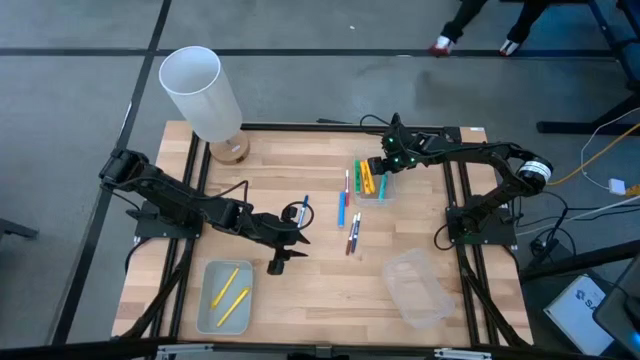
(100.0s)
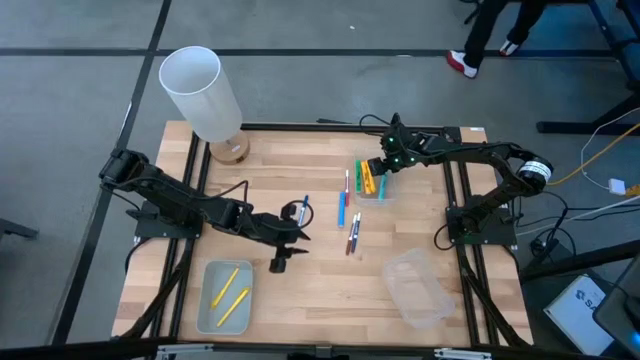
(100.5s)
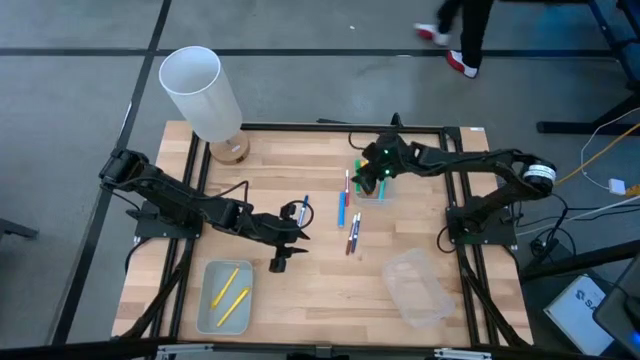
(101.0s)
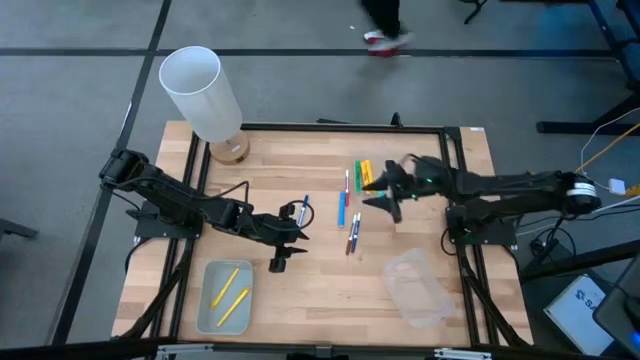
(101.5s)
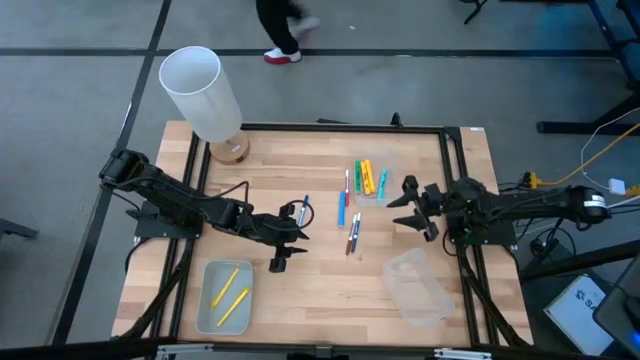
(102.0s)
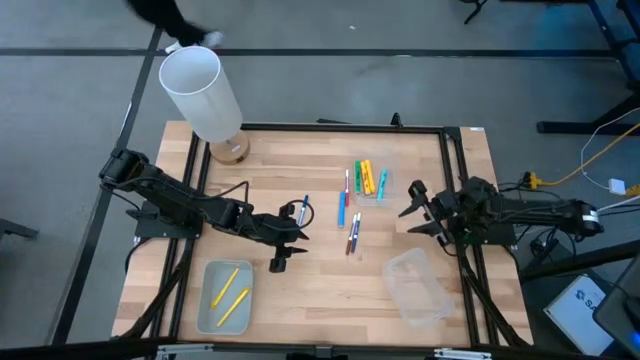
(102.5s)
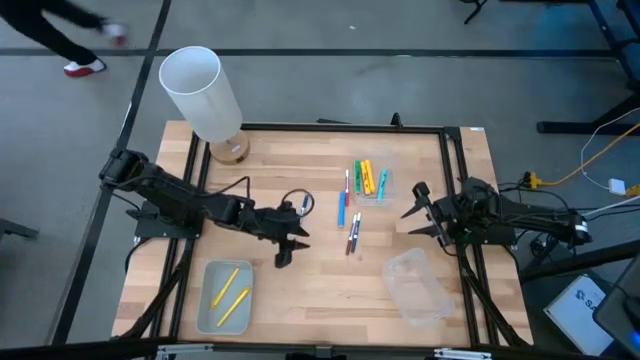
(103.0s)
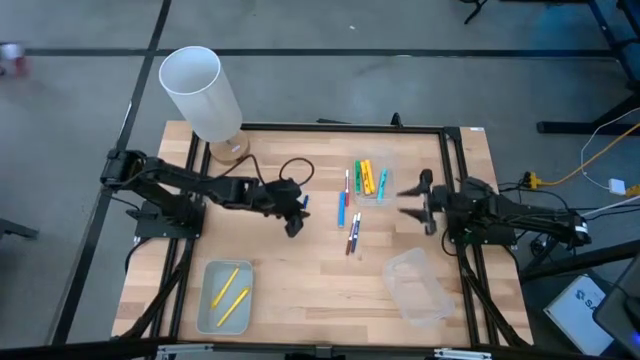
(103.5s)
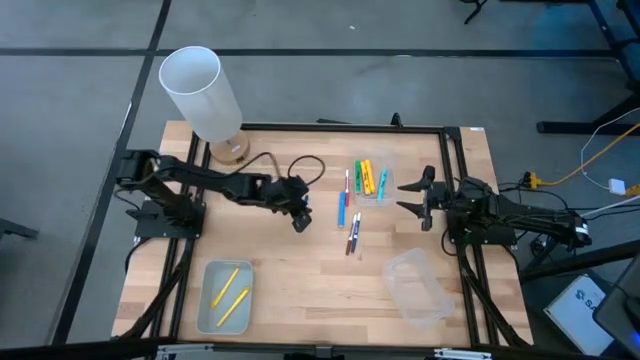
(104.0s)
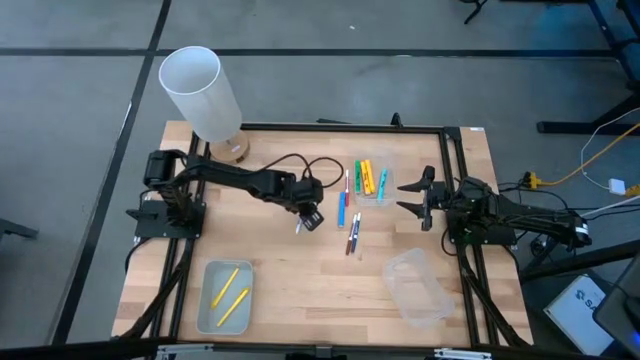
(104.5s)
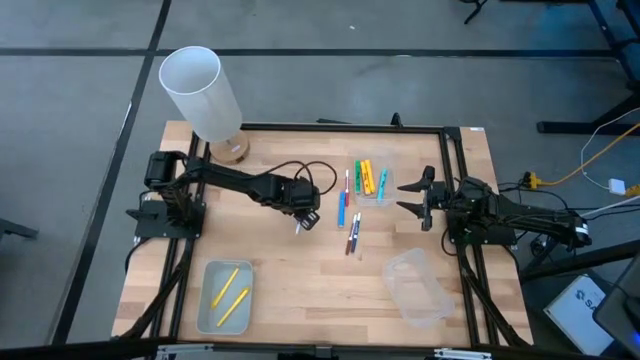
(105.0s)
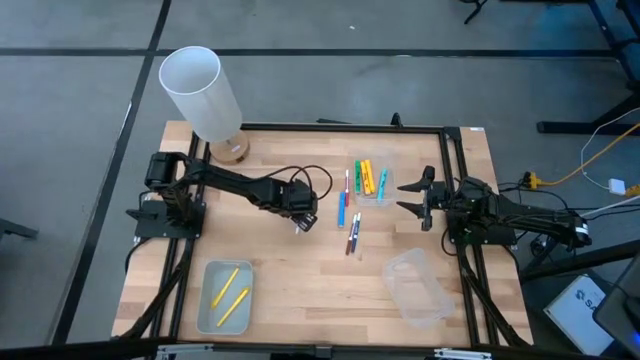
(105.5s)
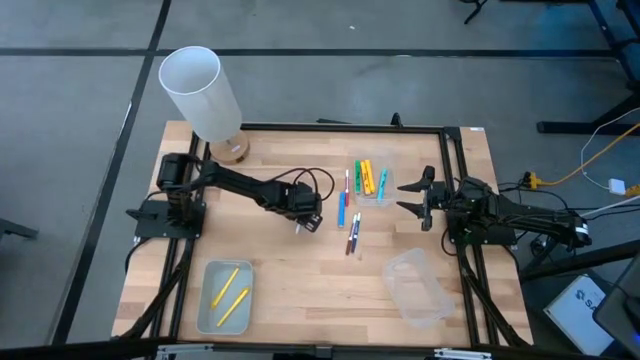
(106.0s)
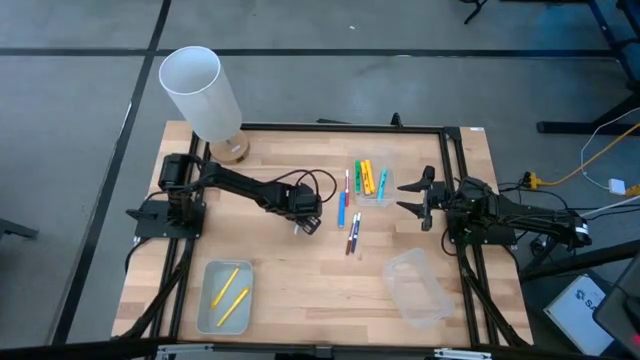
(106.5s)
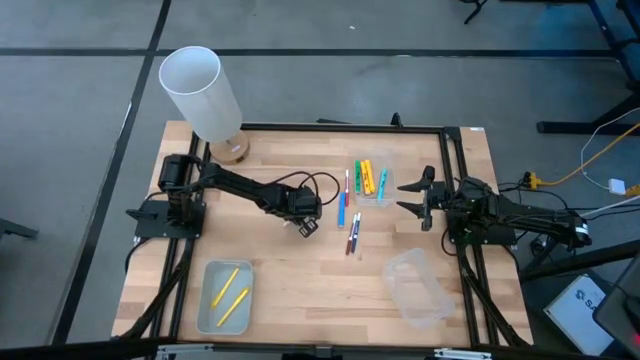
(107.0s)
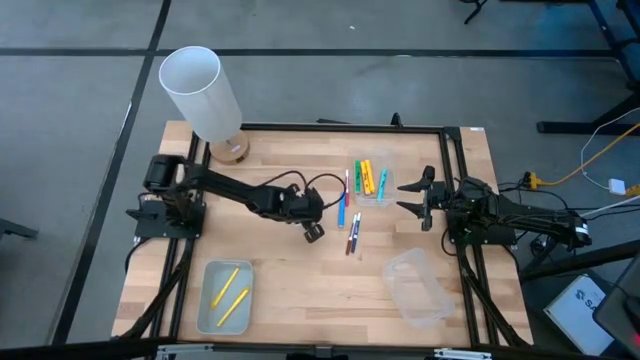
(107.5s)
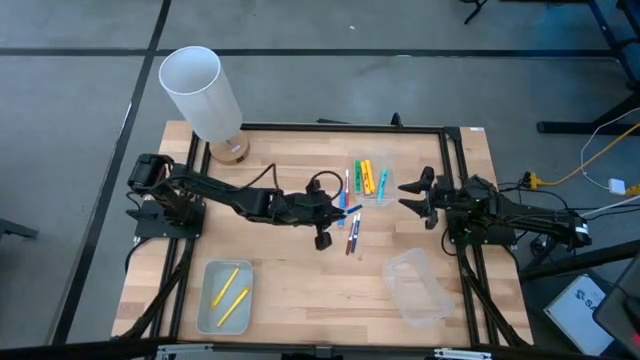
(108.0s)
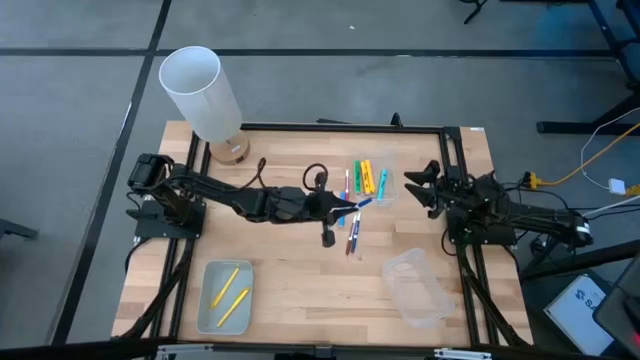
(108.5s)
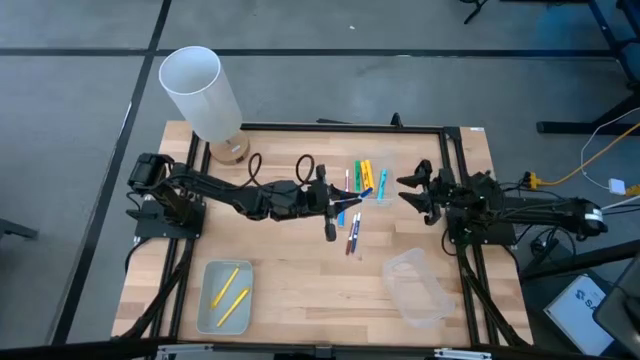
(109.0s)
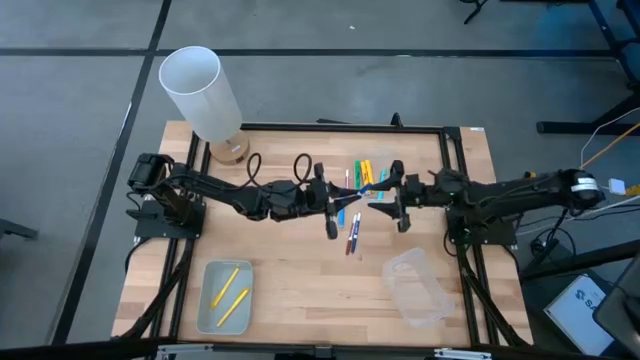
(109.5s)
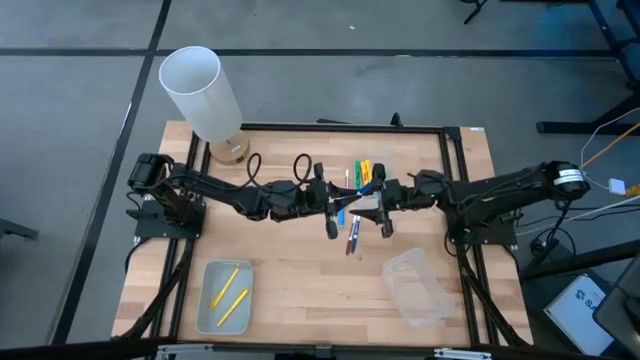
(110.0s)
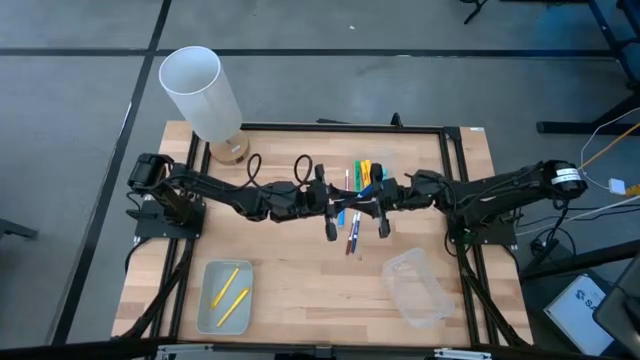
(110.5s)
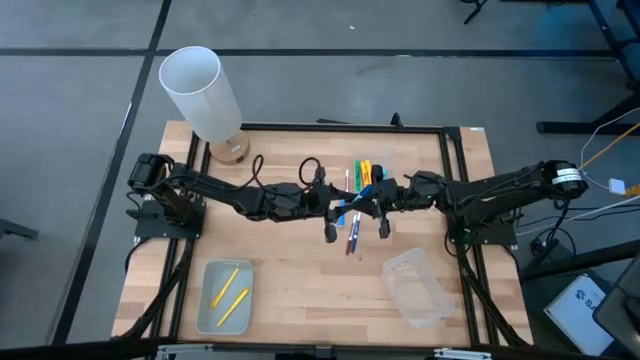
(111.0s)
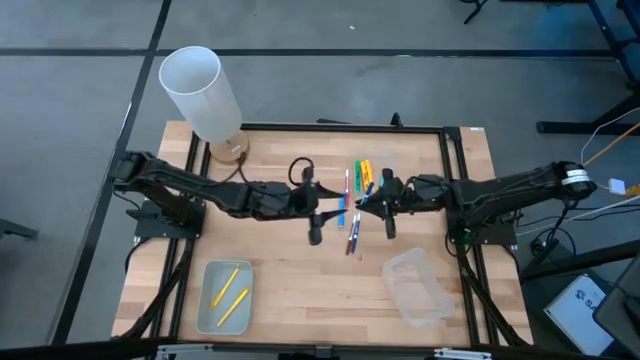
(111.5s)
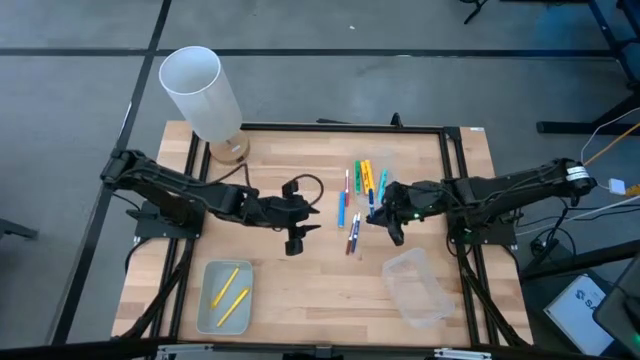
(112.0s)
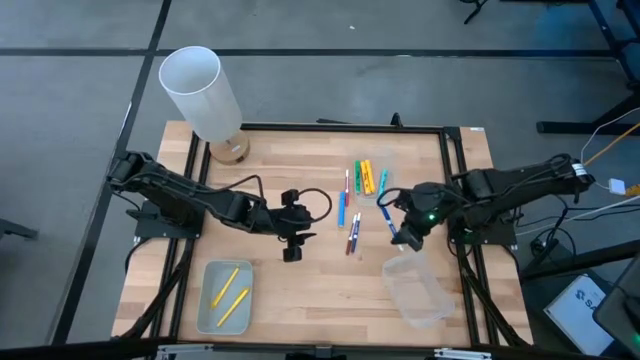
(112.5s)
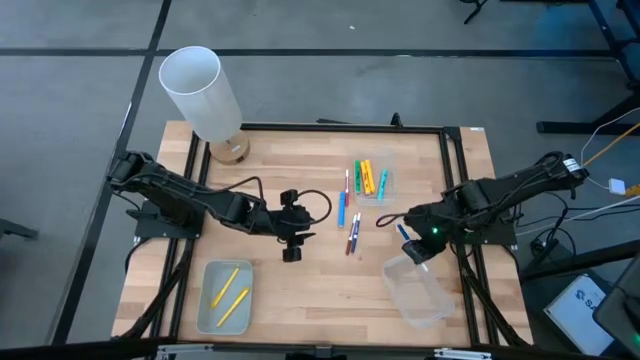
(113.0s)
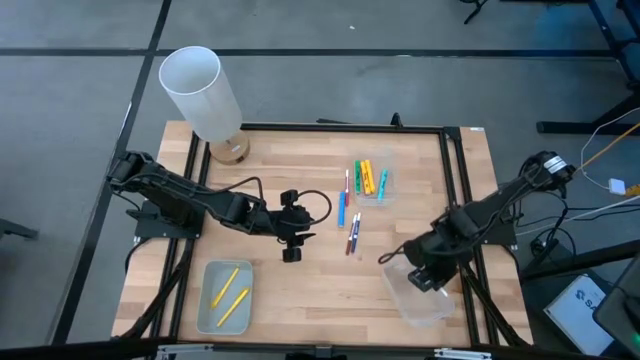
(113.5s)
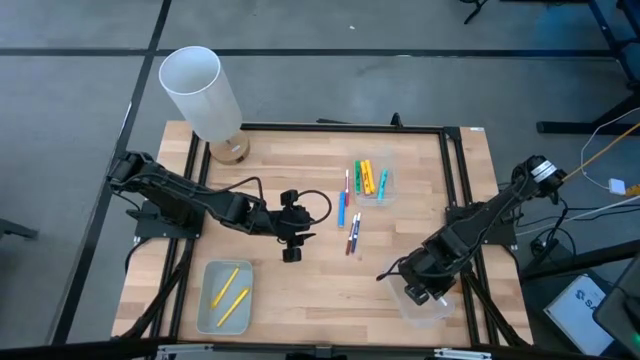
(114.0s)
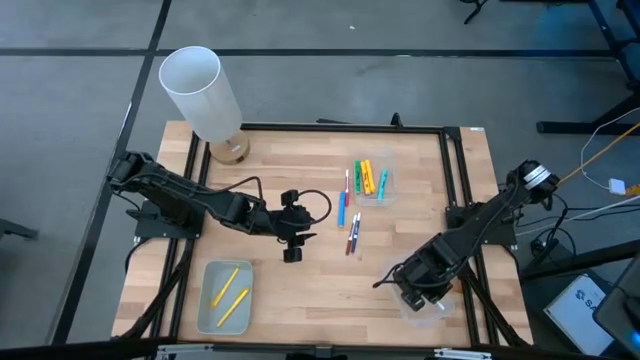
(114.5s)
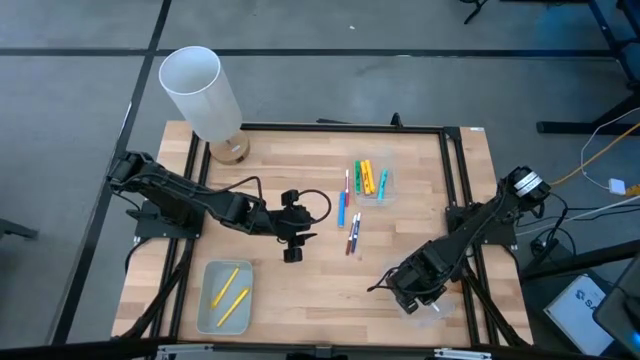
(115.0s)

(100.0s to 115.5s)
Task: Pick & Place Markers
Put the blue marker pen into the bottom transparent bin

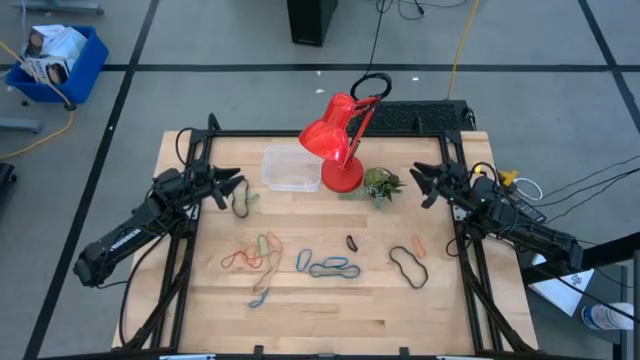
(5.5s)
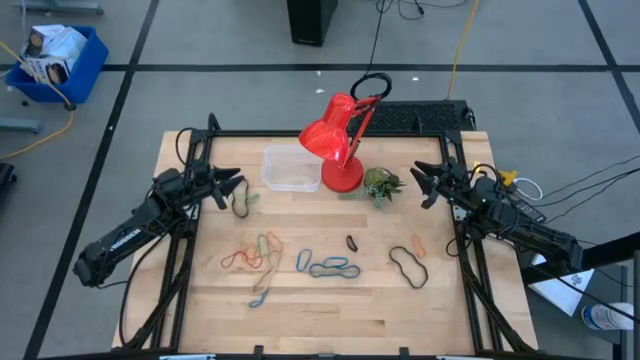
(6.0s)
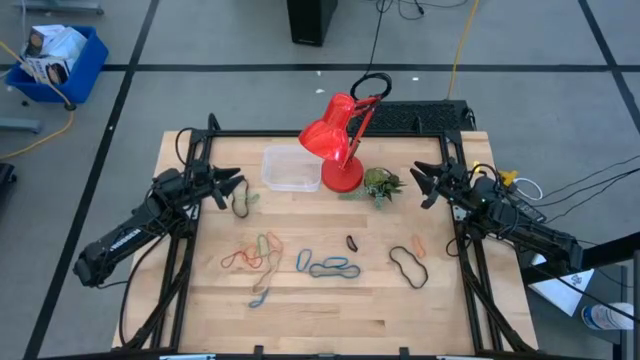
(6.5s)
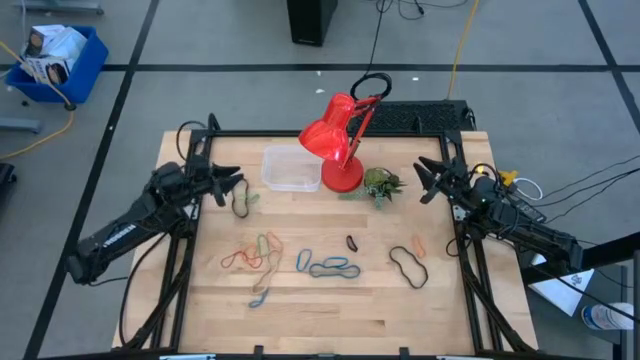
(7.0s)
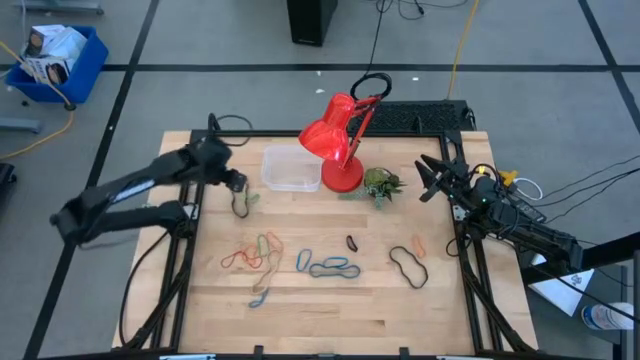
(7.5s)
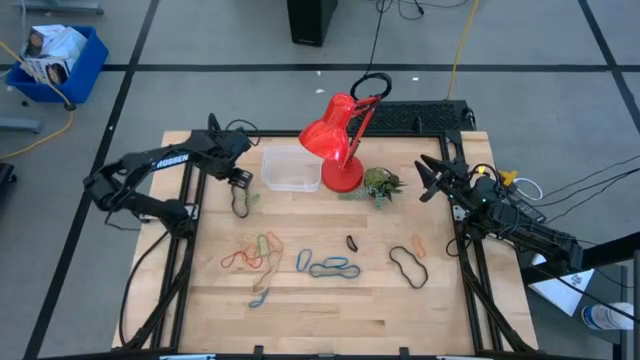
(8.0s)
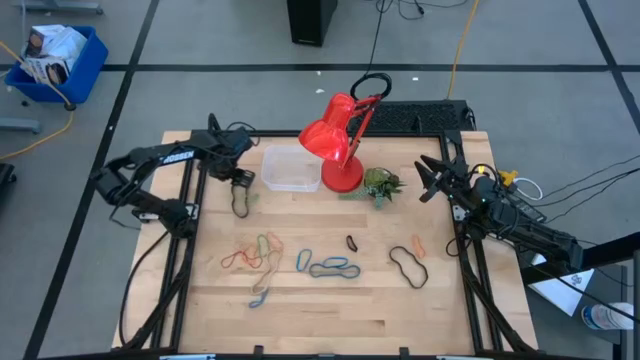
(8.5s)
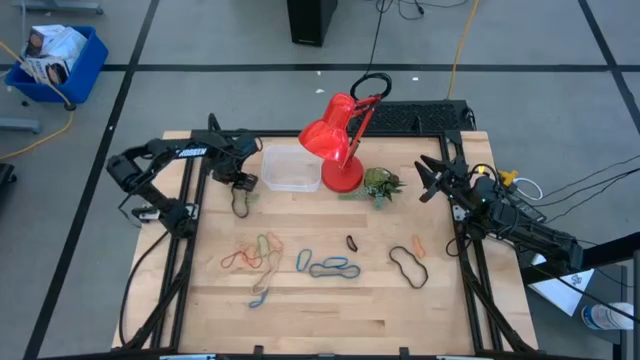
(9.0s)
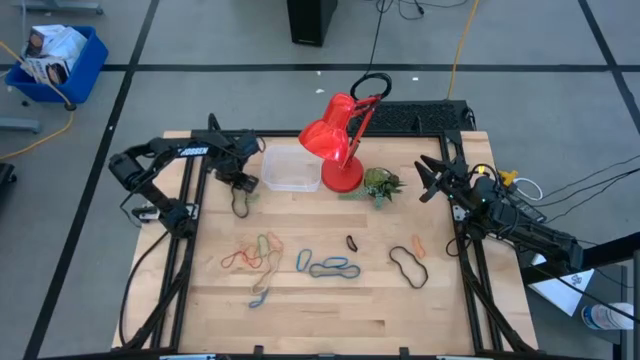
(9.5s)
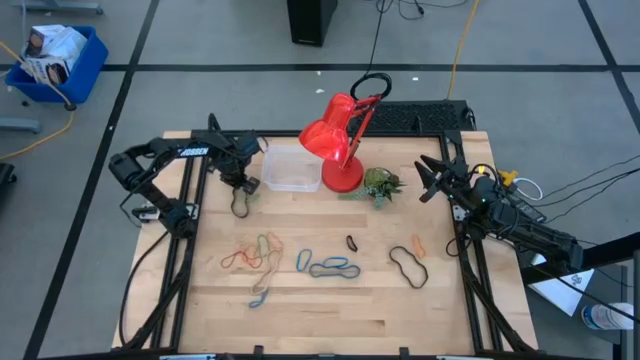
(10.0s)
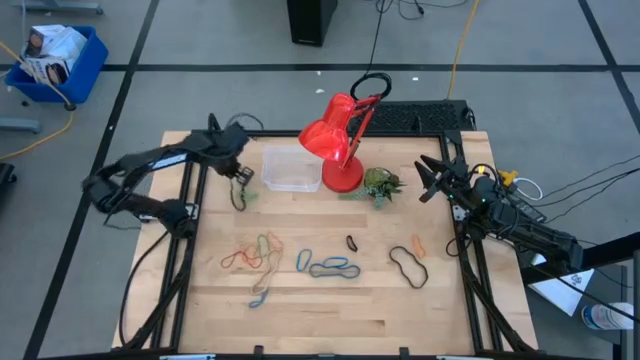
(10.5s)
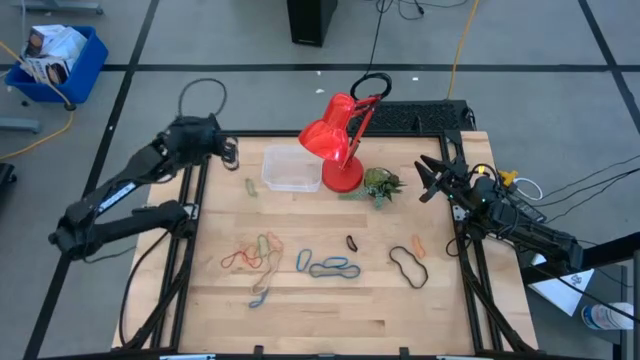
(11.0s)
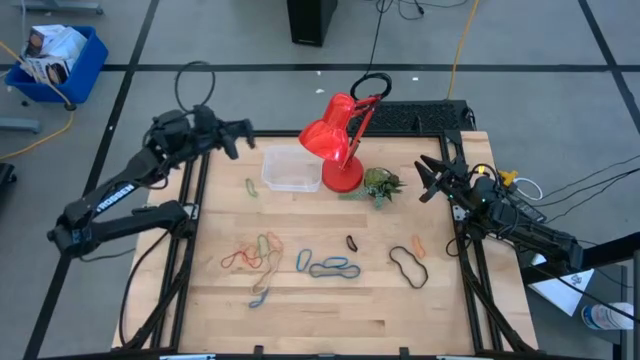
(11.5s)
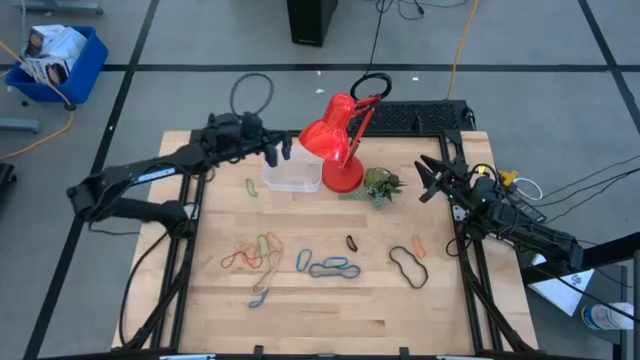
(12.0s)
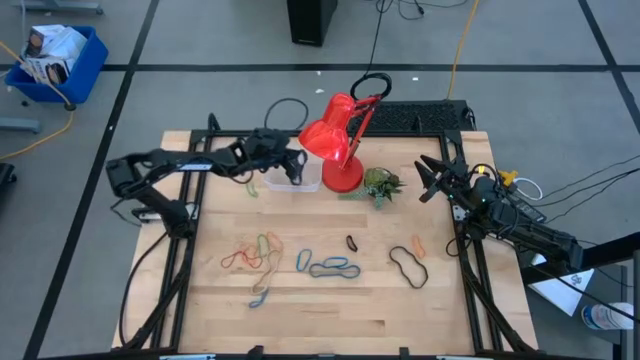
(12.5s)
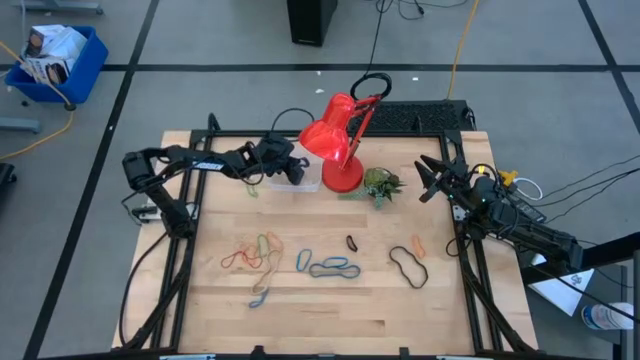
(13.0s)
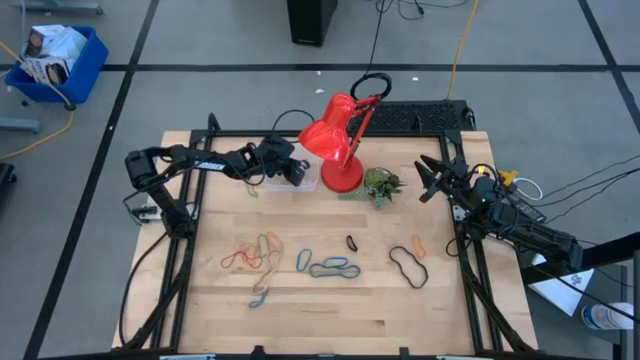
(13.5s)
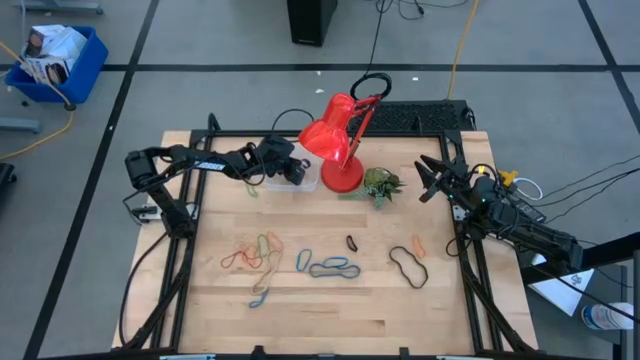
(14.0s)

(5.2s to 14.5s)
Task: Pick and place rubber bands into bin
Put the top black rubber band into the transparent bin
